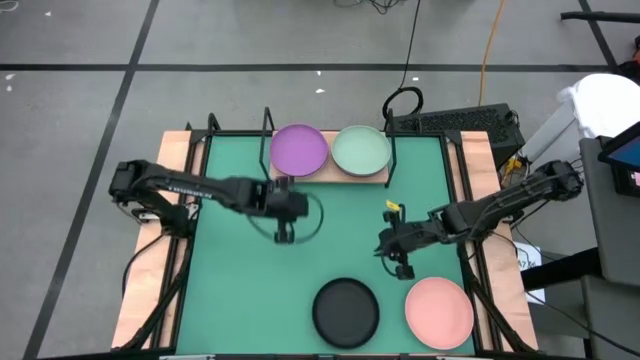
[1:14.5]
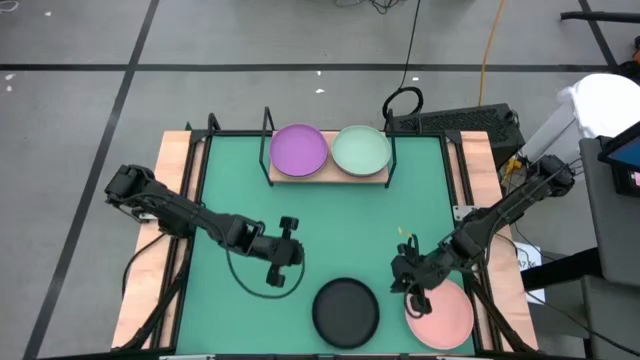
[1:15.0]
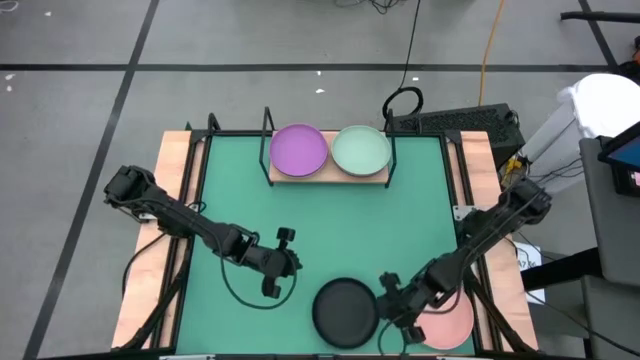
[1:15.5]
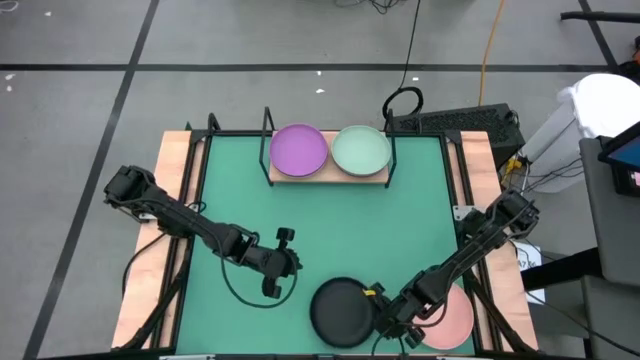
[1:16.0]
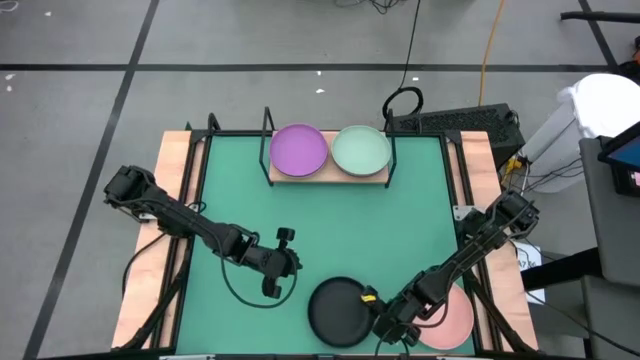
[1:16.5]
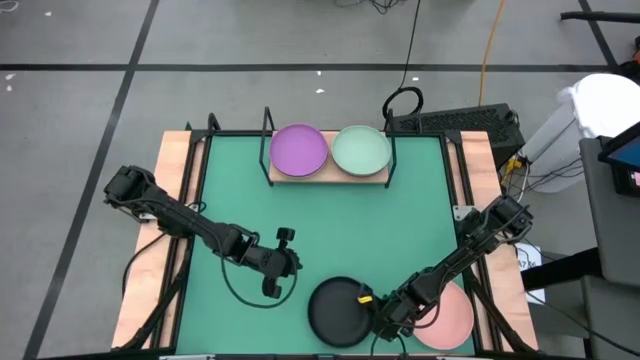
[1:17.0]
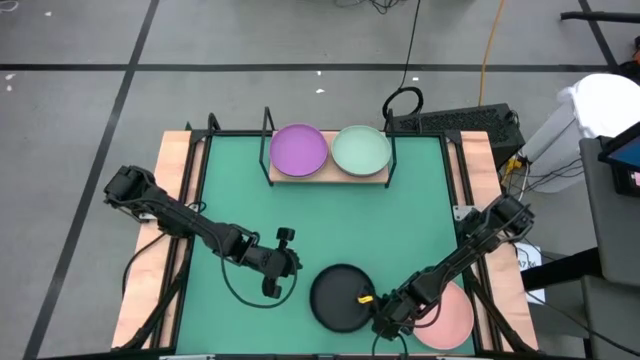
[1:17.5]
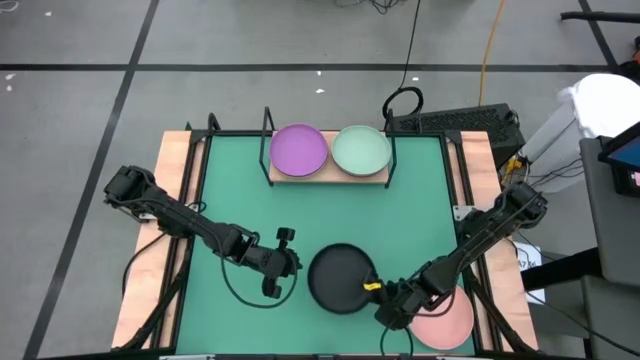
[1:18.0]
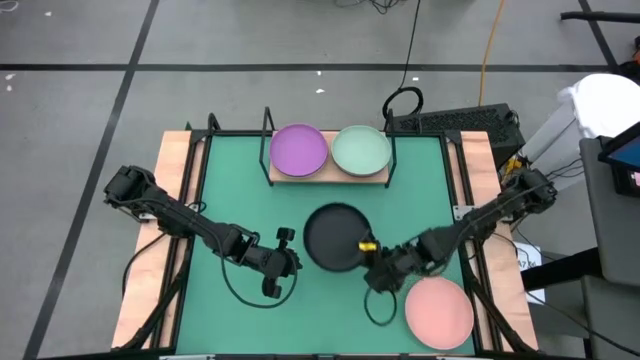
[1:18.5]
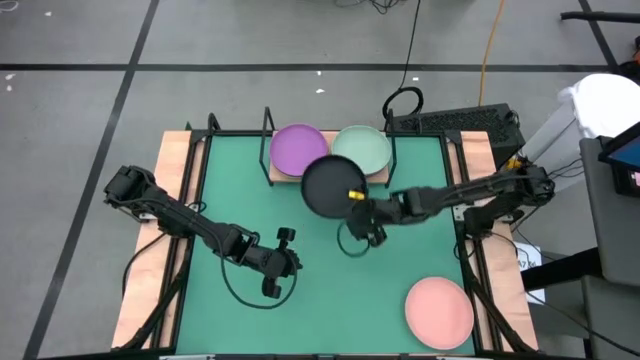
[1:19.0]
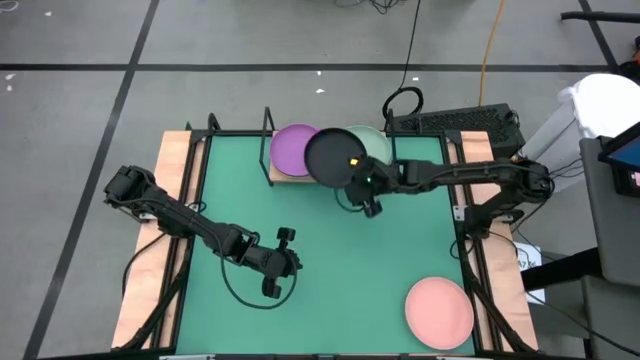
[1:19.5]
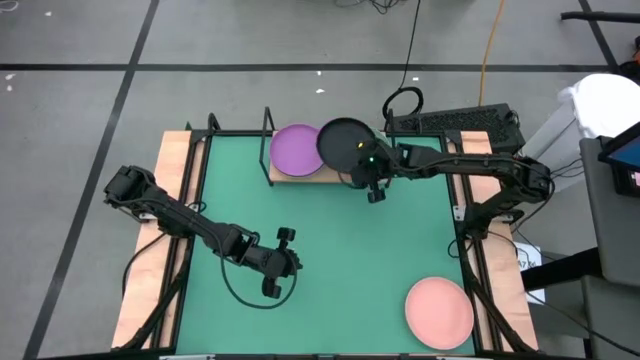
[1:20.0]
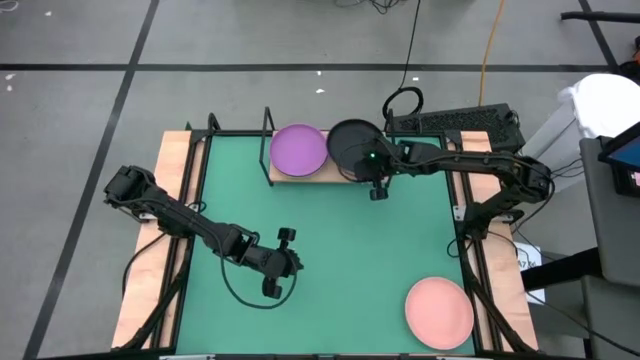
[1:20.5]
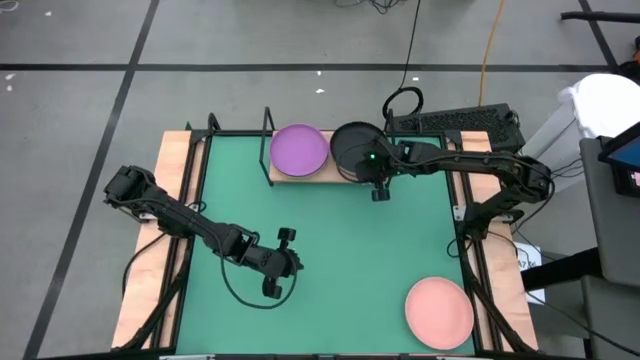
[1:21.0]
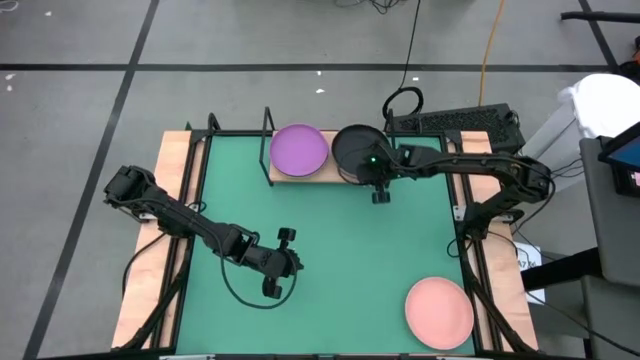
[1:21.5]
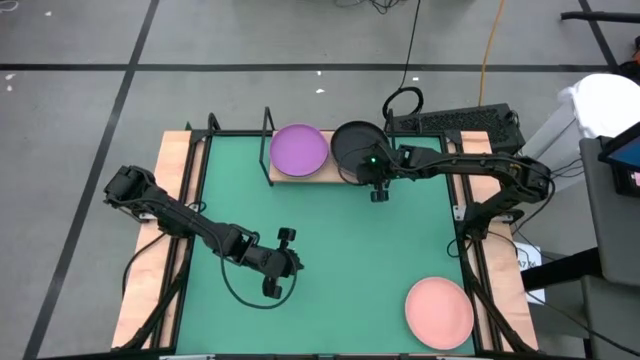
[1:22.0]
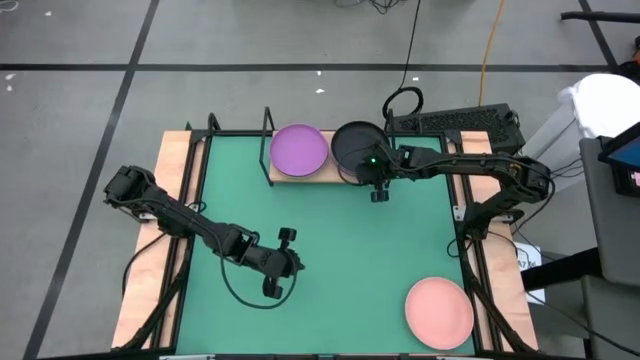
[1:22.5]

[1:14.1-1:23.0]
Task: Place and stack plates onto a shelf
Stack the black plate on top of the light green plate on the shelf

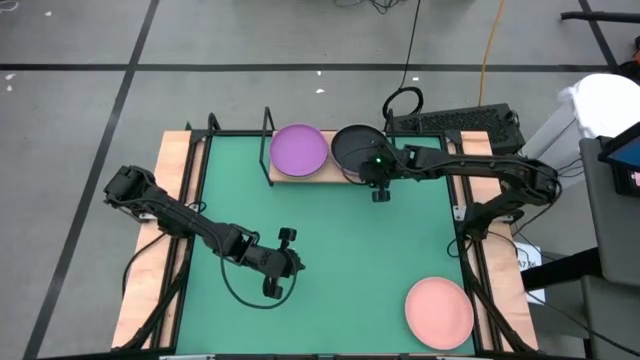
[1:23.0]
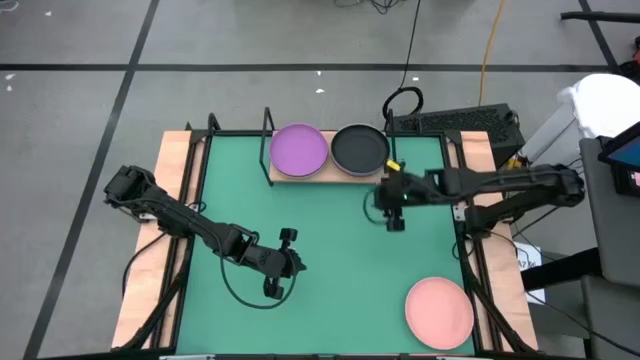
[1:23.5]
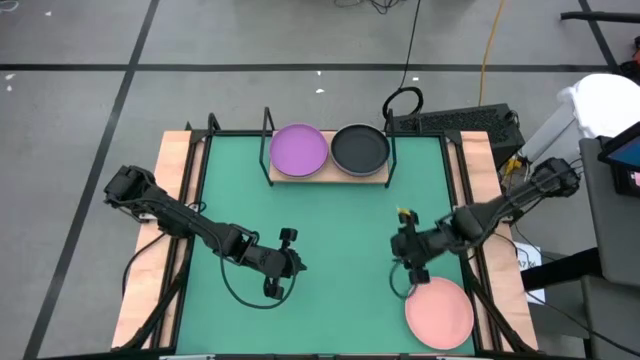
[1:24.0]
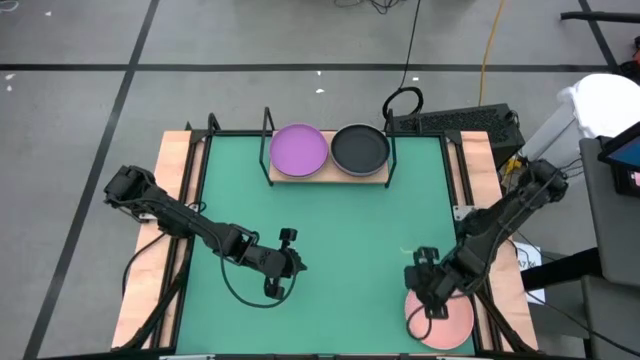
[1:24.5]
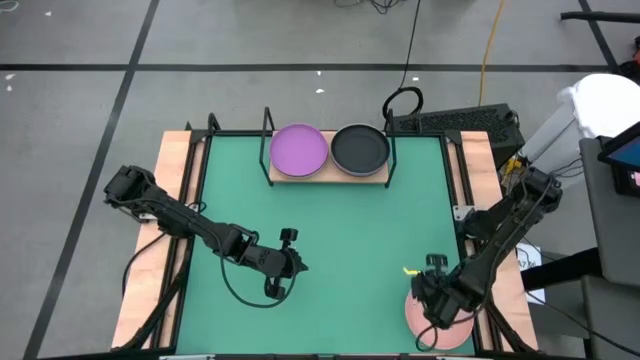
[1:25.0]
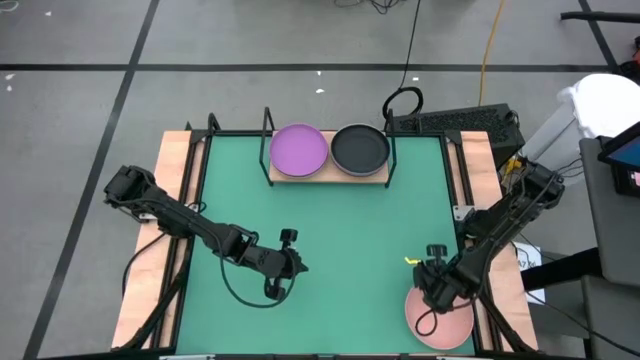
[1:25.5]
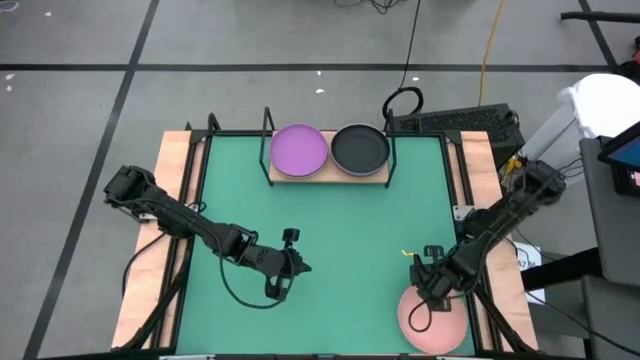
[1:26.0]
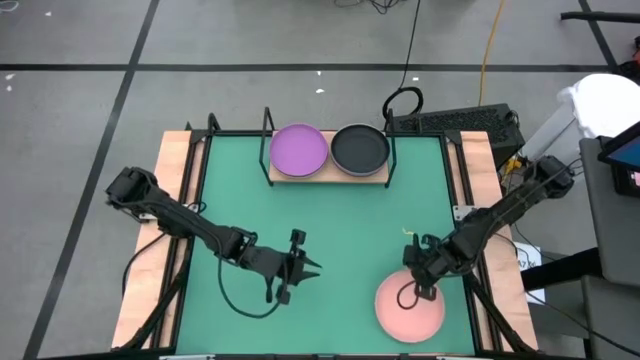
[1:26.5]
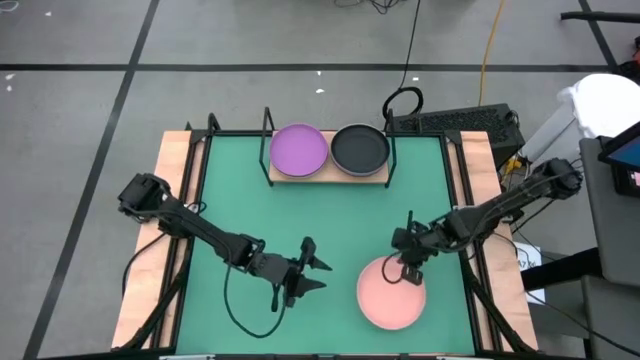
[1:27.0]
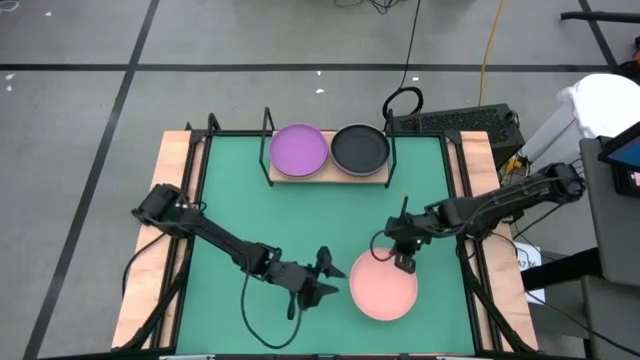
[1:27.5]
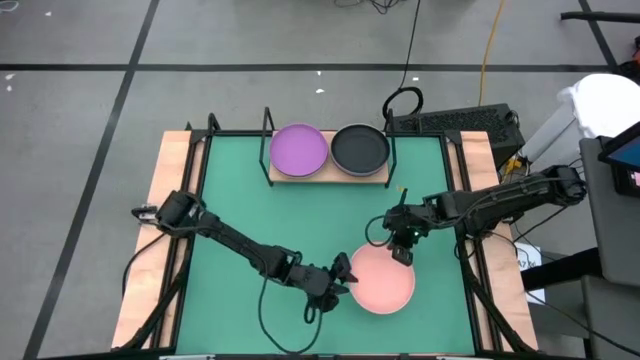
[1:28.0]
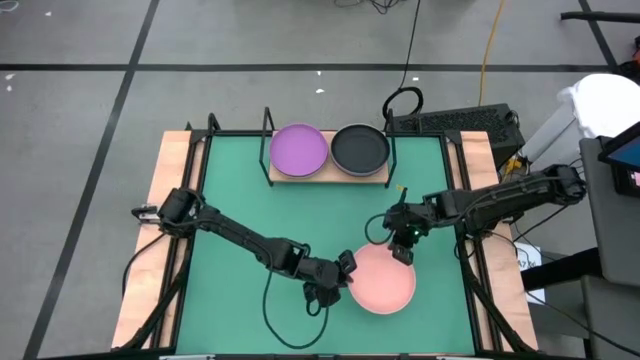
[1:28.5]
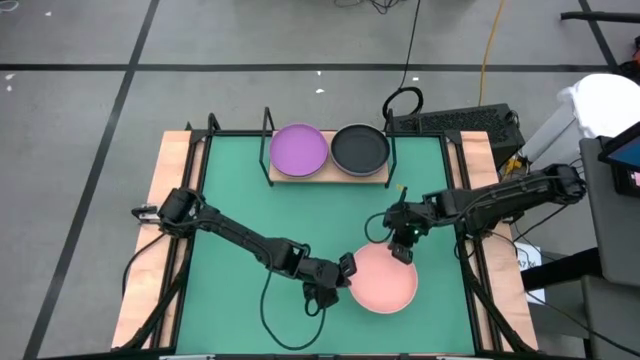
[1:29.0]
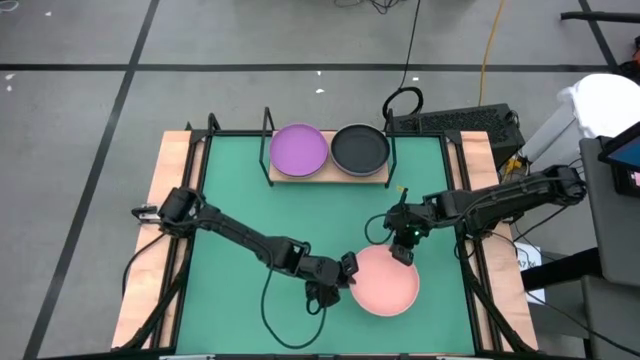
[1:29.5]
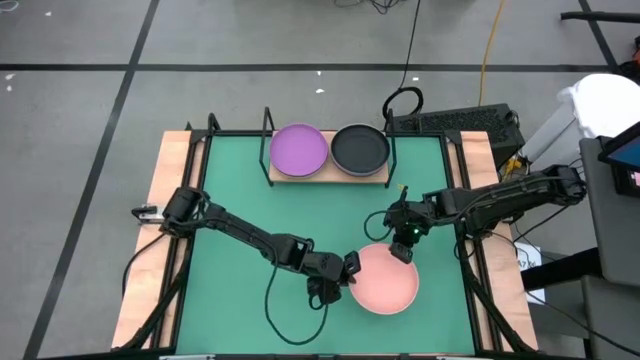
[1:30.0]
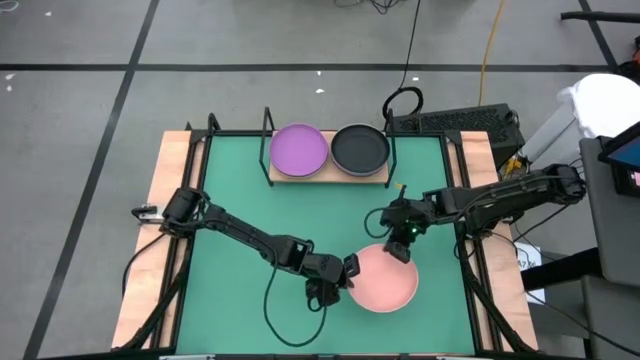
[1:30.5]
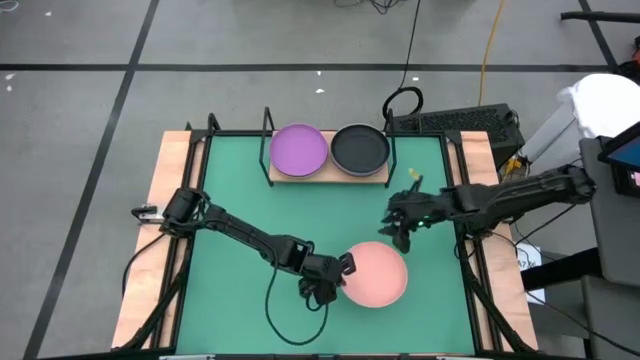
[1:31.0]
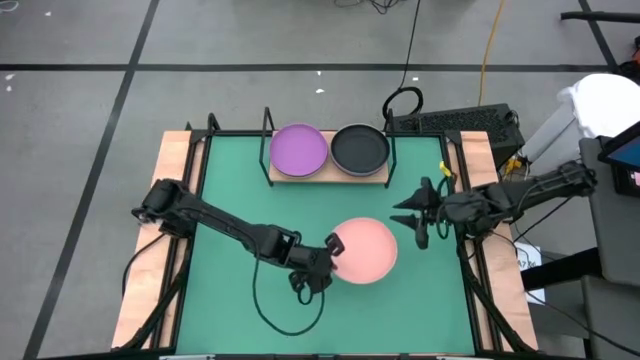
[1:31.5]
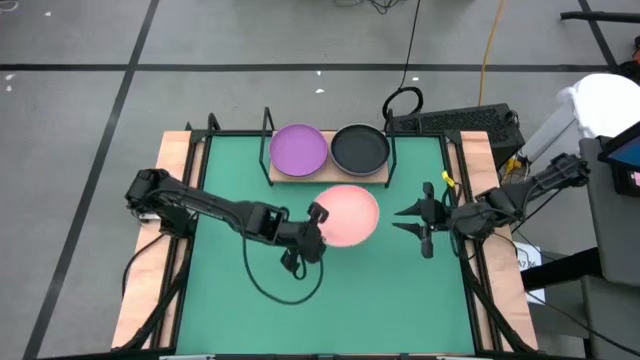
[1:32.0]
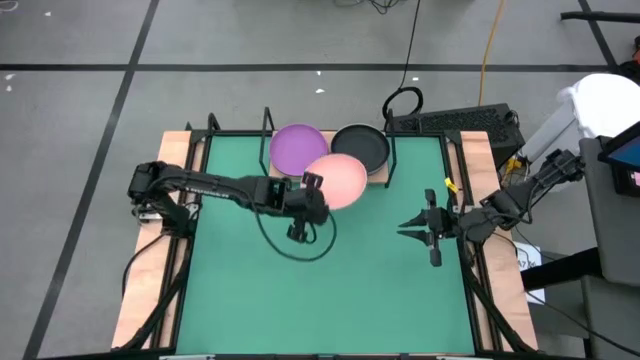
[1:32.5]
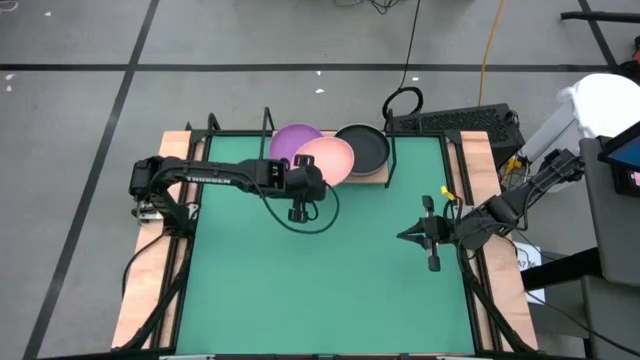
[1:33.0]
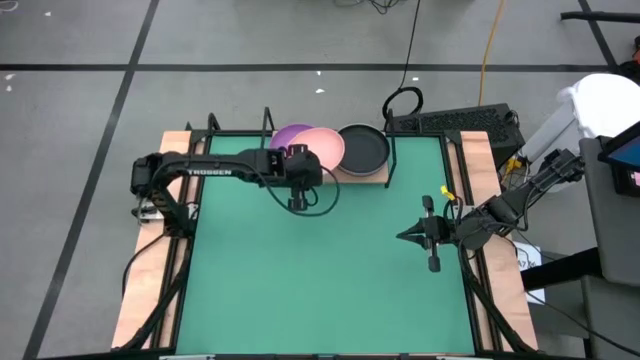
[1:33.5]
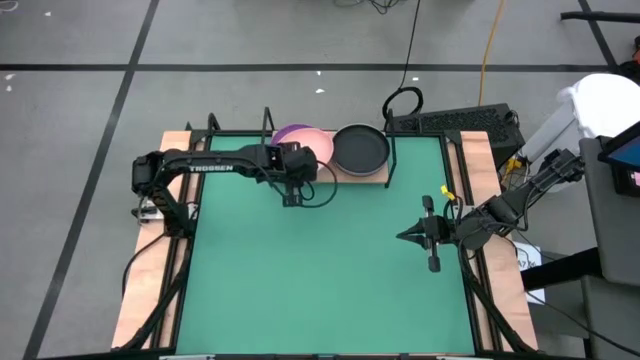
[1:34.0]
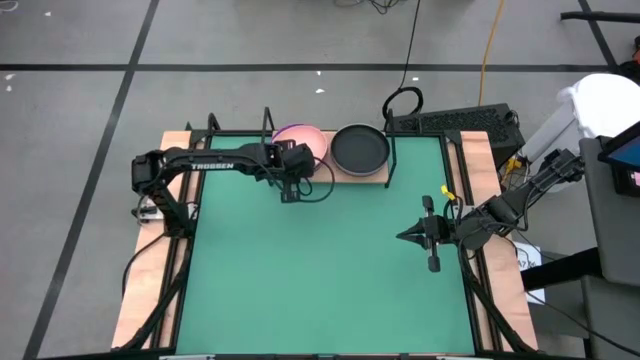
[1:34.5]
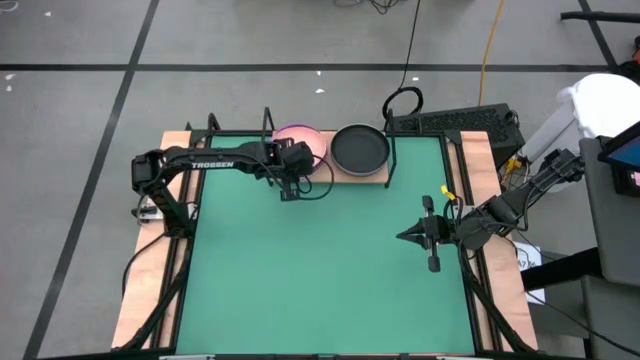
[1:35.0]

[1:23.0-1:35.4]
Stack the light orange on top of the purple plate on the shelf

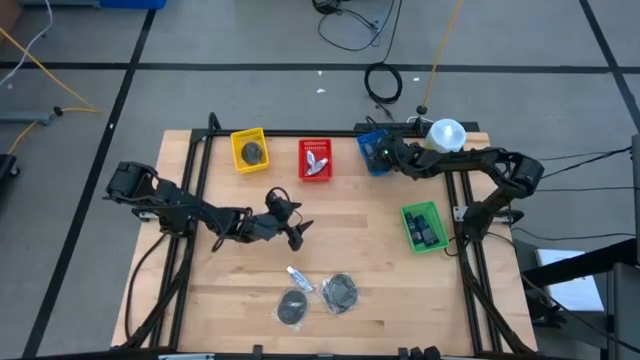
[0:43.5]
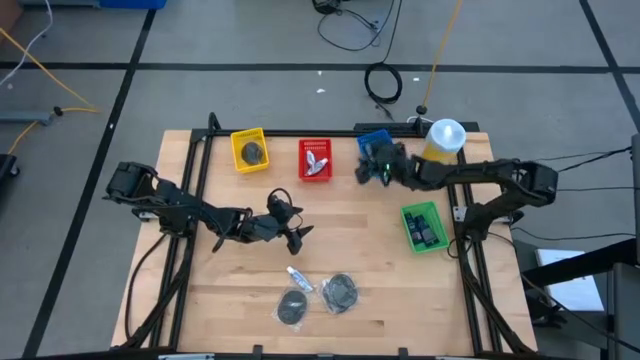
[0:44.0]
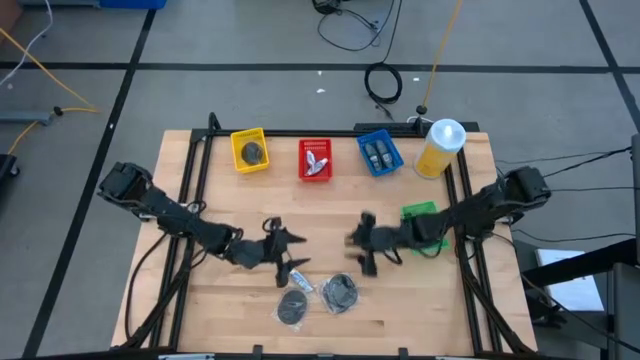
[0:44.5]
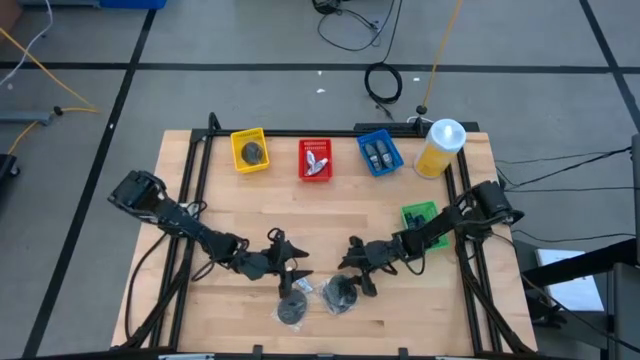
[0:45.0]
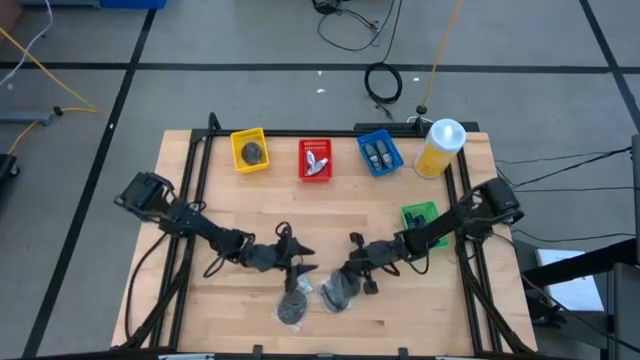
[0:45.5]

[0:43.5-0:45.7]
Task: Pick & Place Travel size toiletries
Put the black hairbrush into the yellow bin
